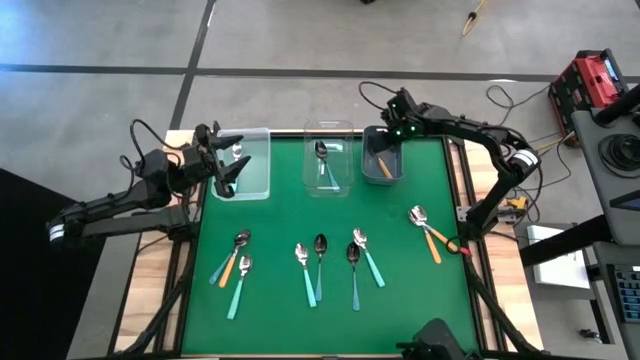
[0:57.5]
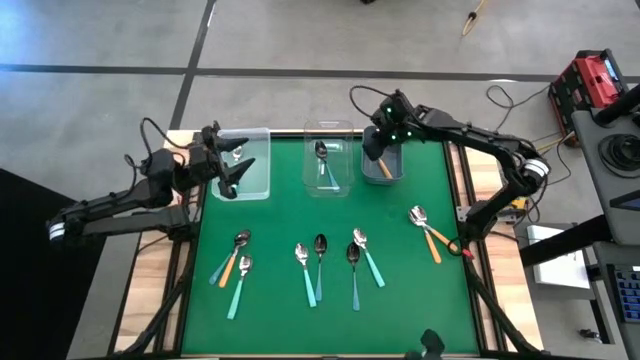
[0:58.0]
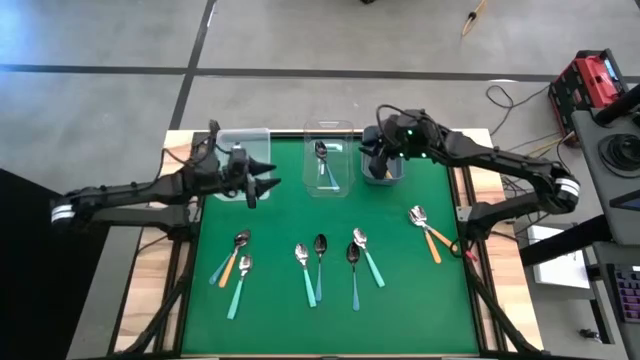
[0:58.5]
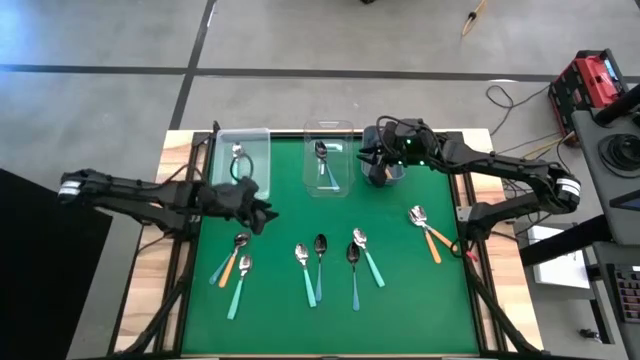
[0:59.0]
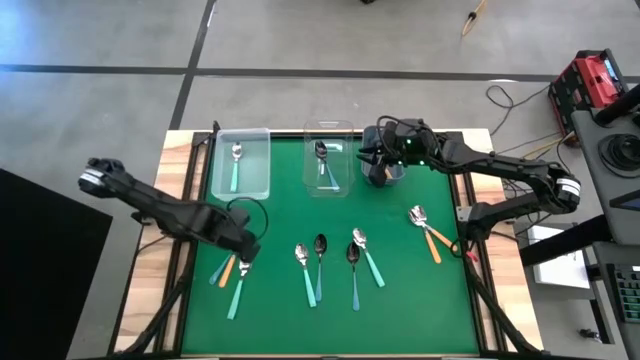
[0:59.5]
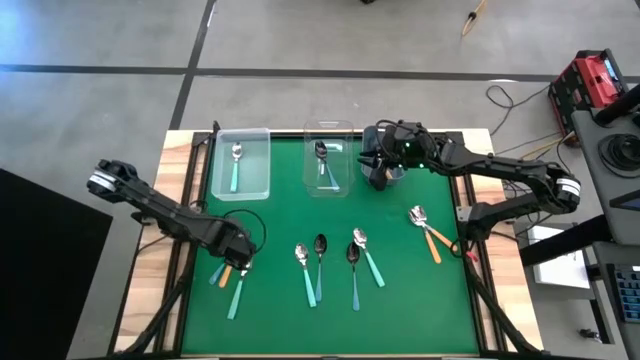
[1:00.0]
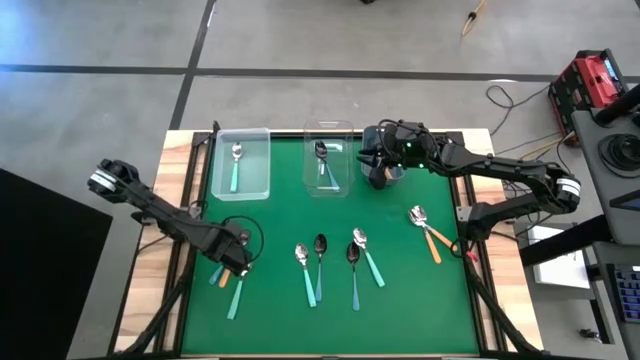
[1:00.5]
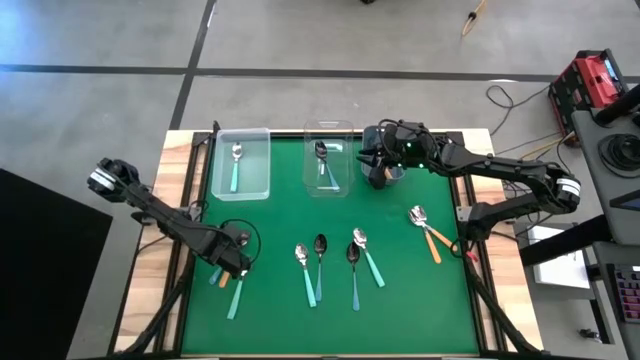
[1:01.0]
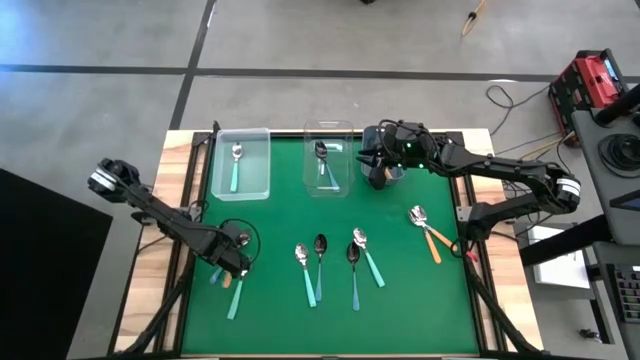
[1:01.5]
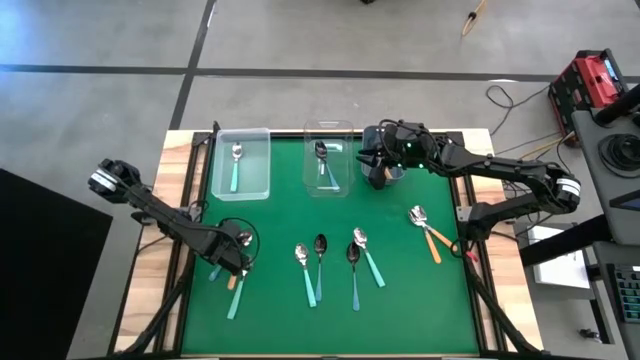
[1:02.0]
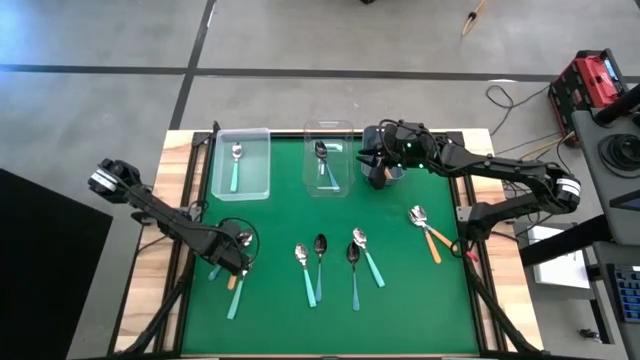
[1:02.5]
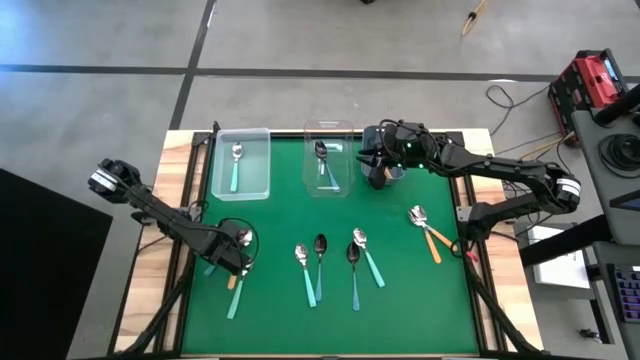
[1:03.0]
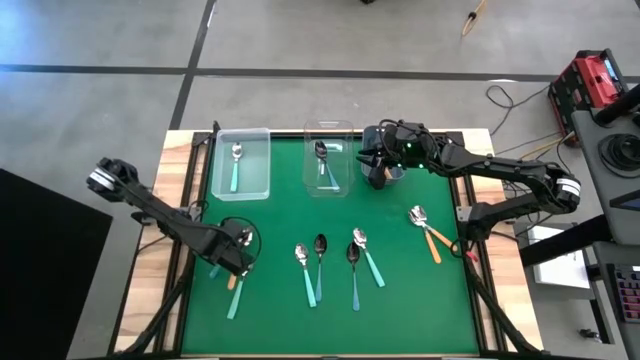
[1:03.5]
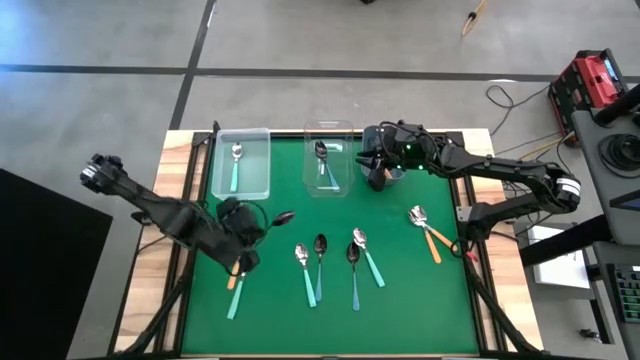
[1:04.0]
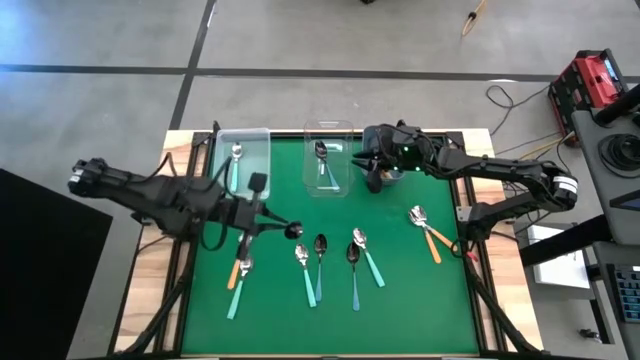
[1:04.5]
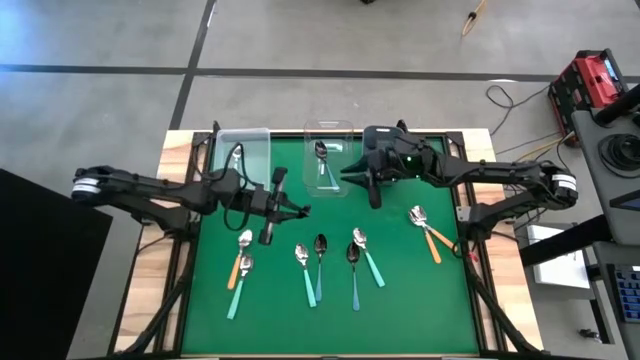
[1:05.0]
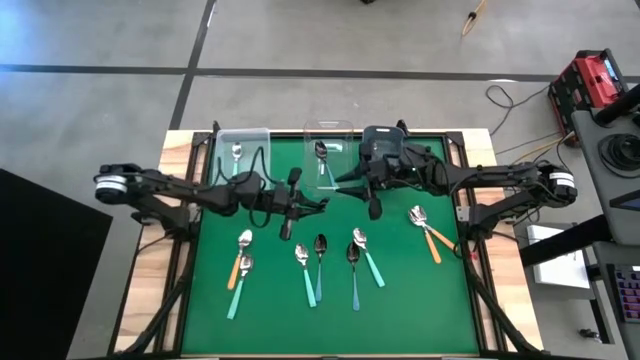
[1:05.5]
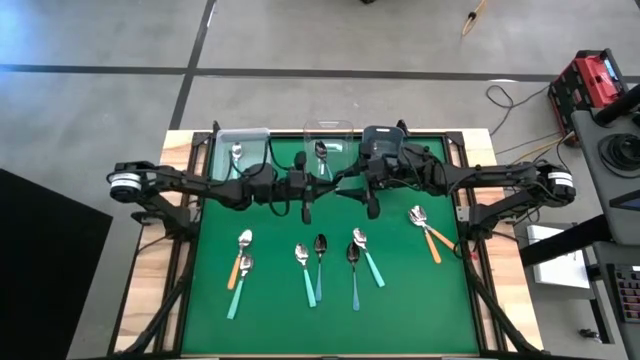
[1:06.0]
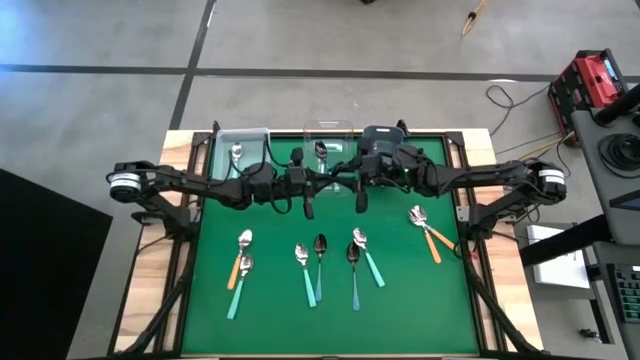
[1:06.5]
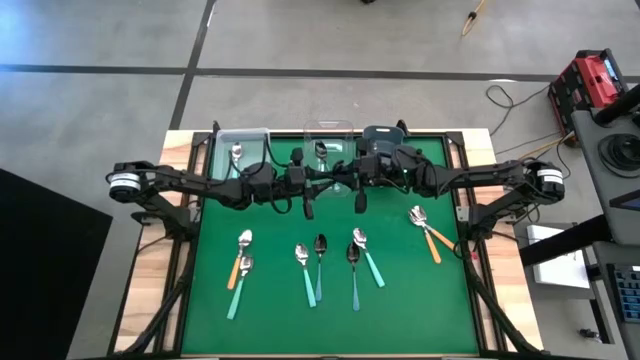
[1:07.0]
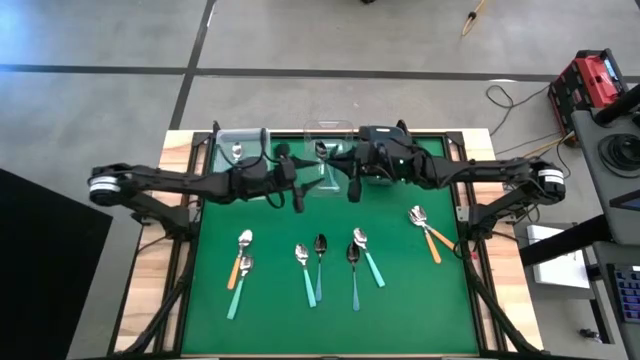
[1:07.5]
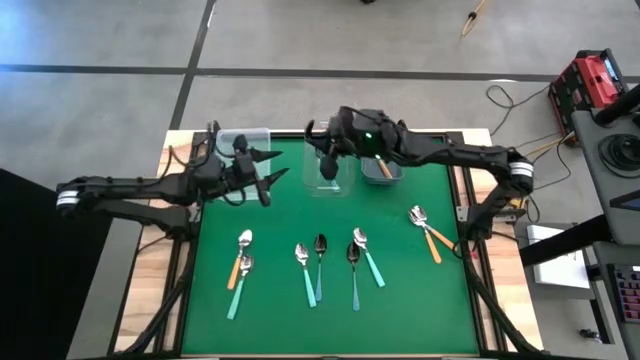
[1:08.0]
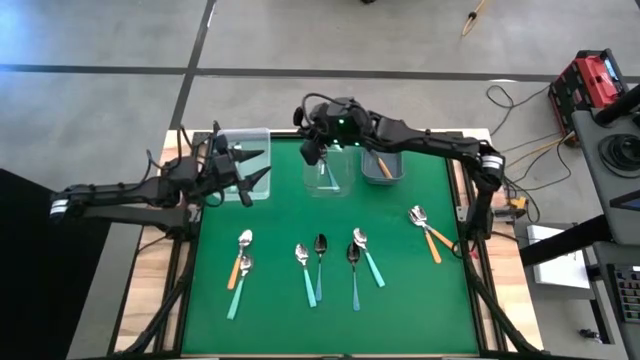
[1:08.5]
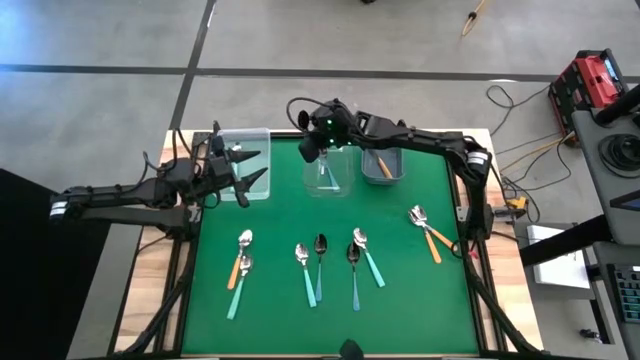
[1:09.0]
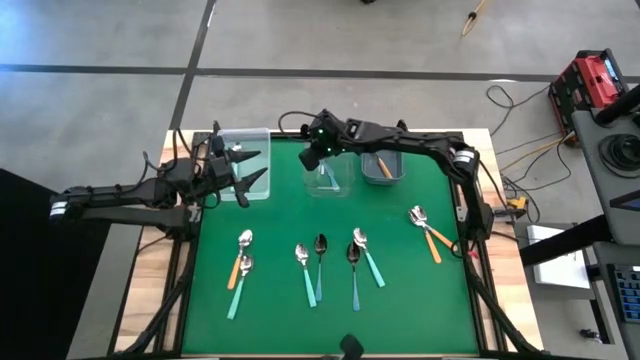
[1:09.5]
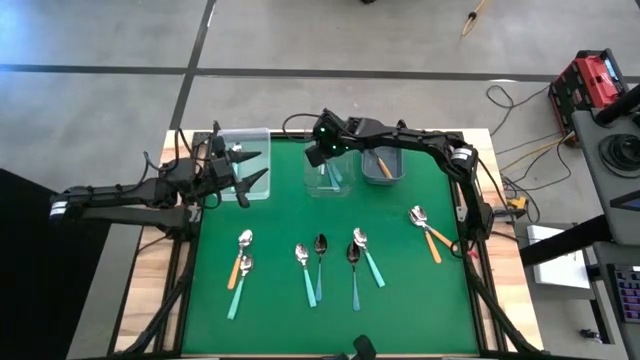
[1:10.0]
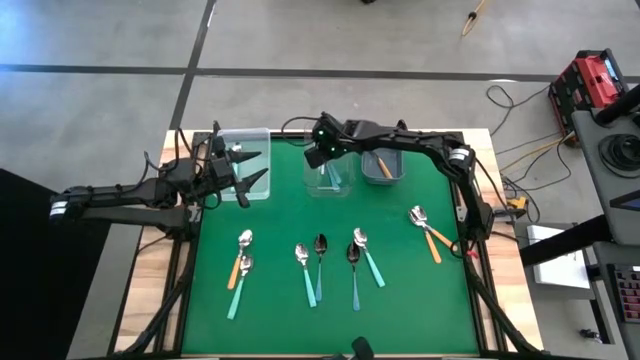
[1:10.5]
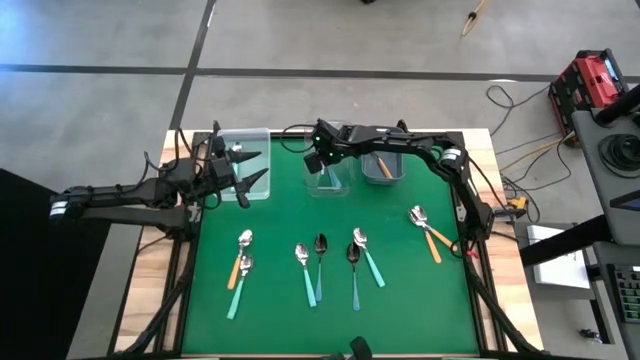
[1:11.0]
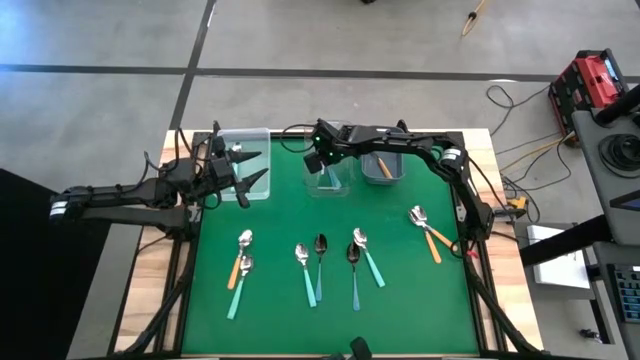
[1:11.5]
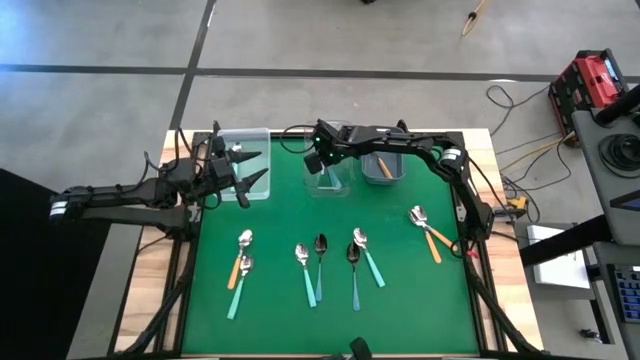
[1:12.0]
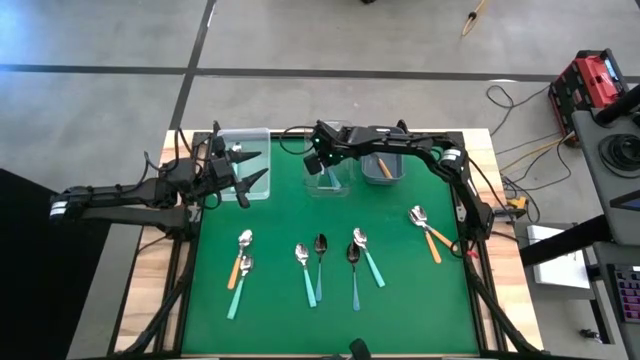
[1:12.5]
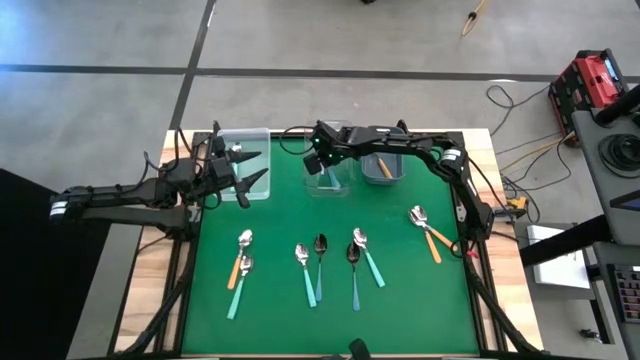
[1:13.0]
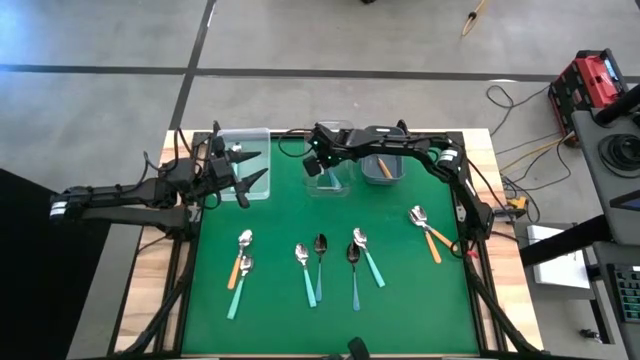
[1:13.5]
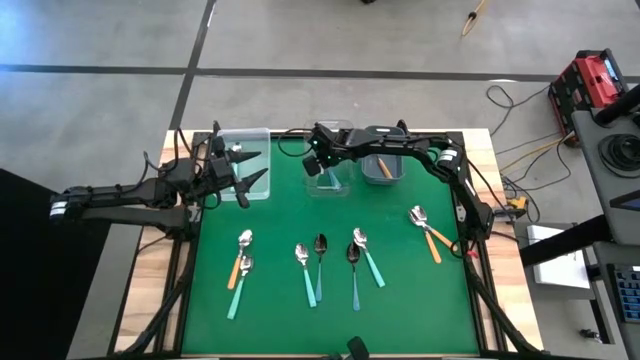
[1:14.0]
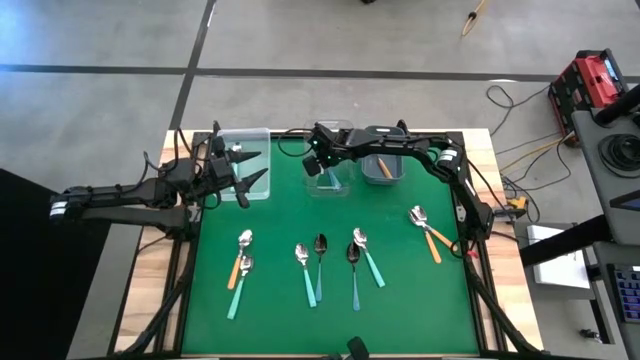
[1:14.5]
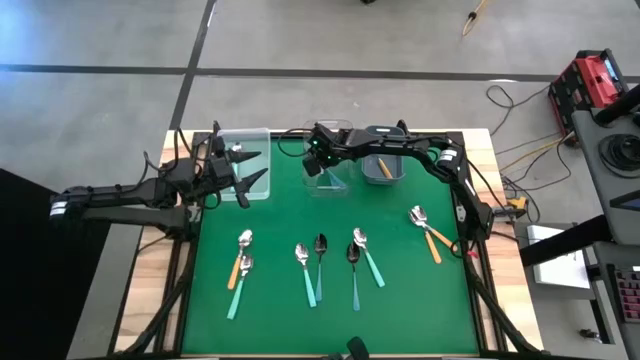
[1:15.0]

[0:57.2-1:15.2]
Task: Sort silverware by color (type)
Put the blue spoon into the transparent bin

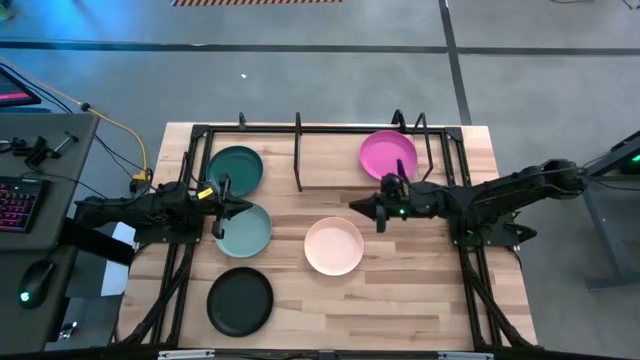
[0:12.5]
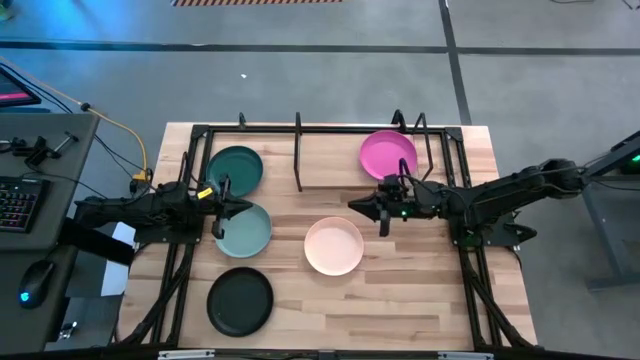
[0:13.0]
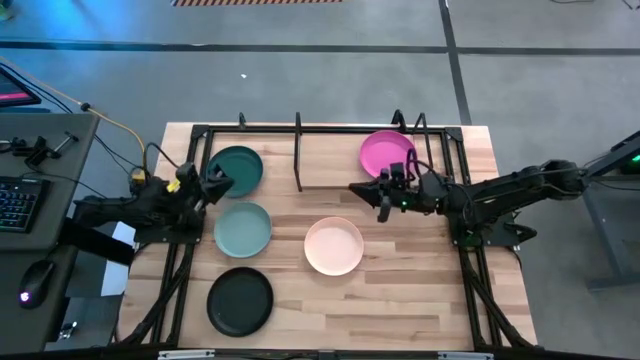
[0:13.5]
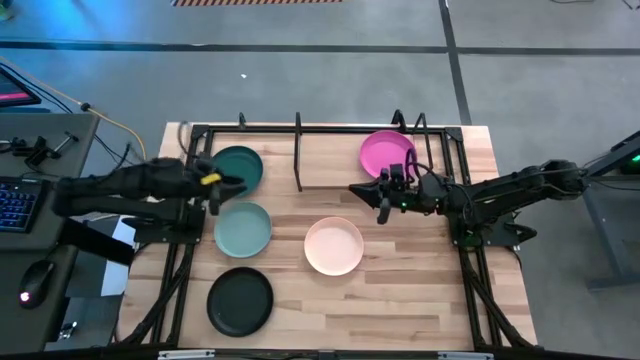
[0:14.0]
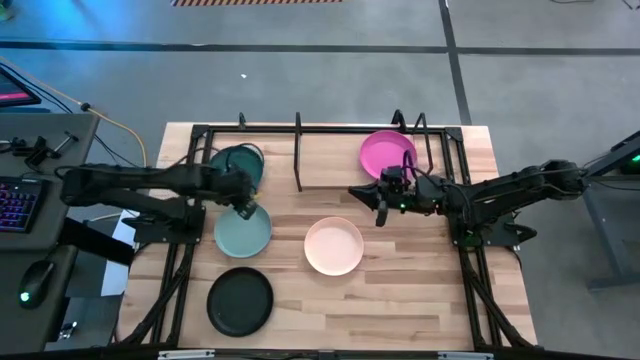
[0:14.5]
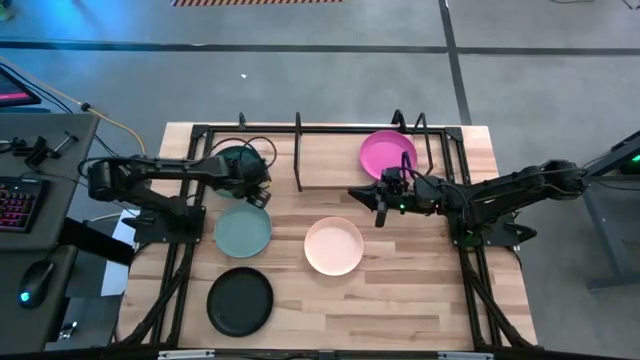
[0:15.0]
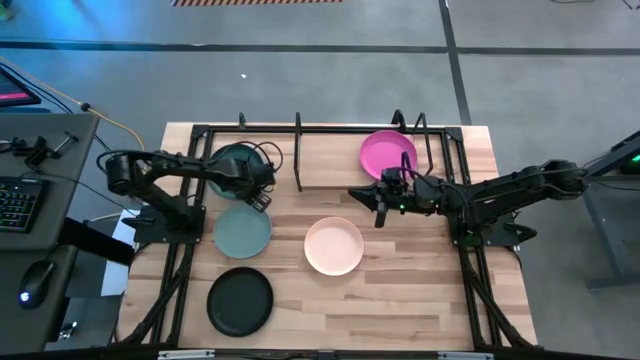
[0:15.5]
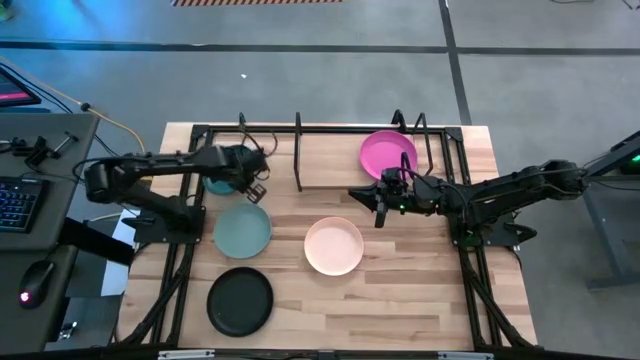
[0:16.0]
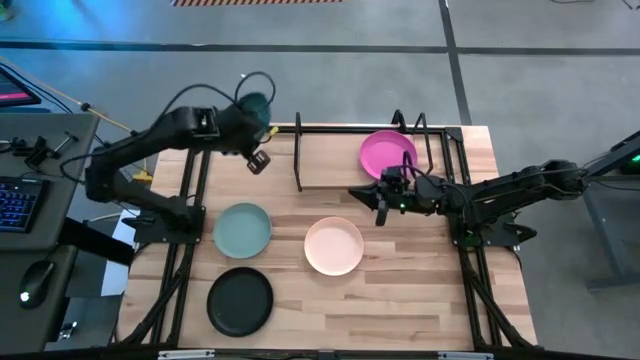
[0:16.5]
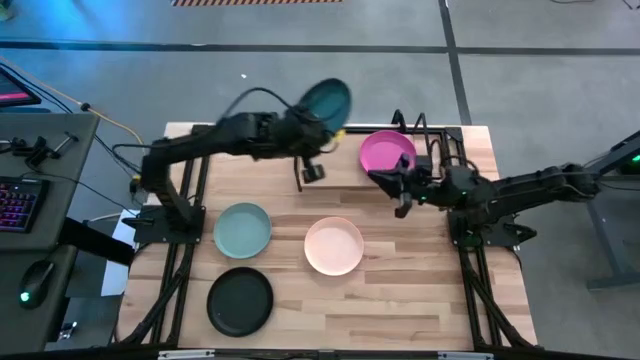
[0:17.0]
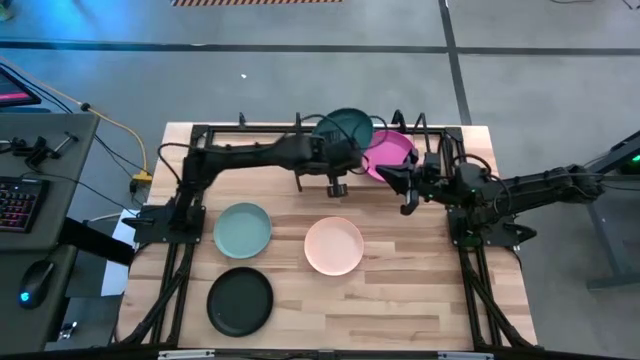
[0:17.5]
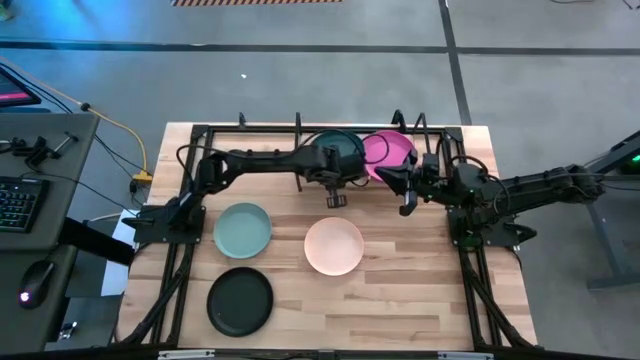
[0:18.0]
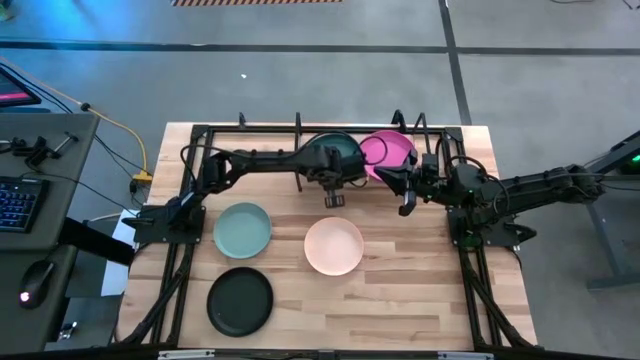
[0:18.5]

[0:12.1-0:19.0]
Task: Place and stack plates onto a shelf
Put the dark blue plate on the shelf
